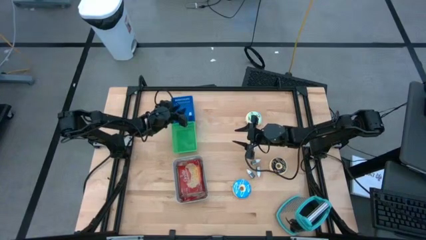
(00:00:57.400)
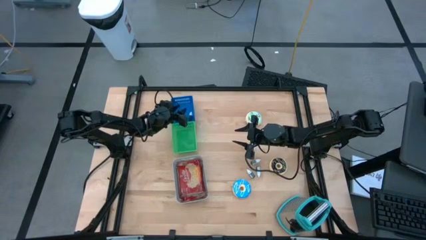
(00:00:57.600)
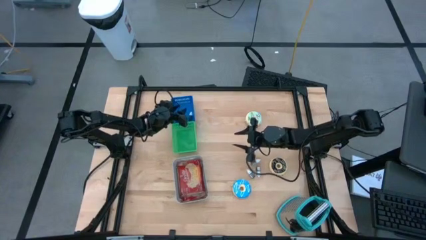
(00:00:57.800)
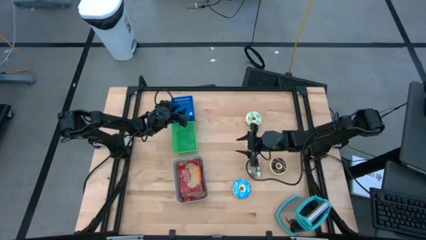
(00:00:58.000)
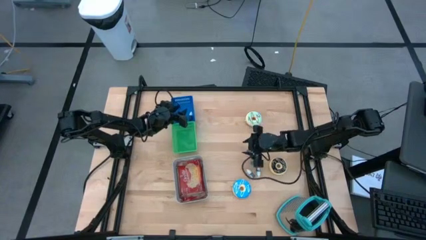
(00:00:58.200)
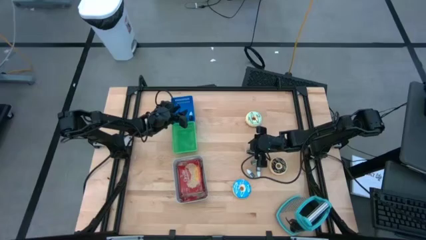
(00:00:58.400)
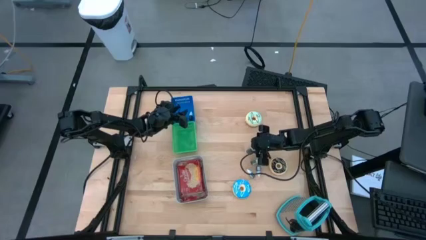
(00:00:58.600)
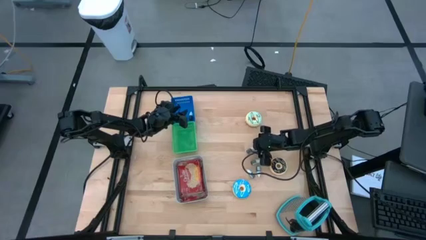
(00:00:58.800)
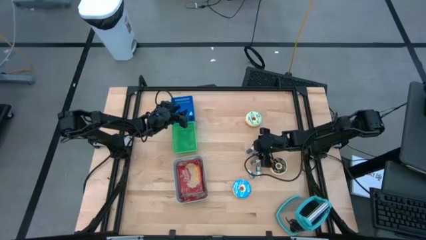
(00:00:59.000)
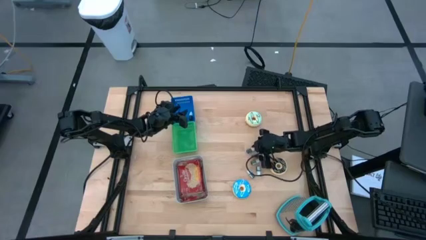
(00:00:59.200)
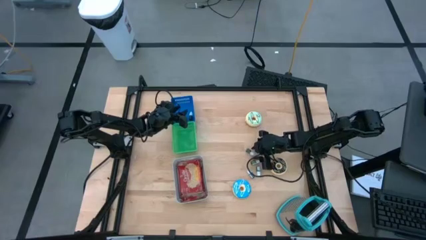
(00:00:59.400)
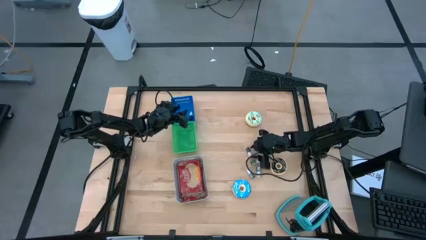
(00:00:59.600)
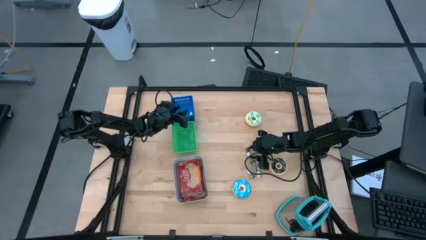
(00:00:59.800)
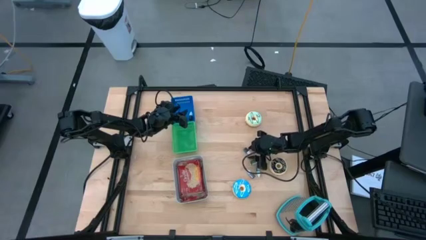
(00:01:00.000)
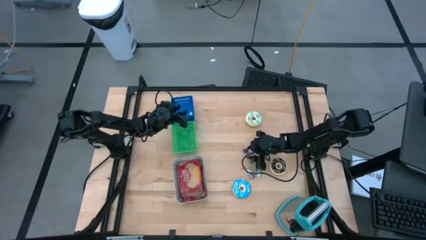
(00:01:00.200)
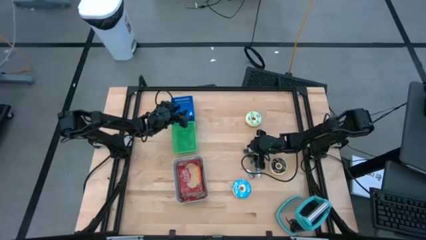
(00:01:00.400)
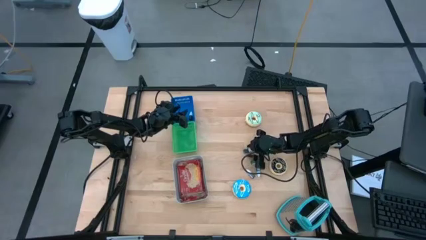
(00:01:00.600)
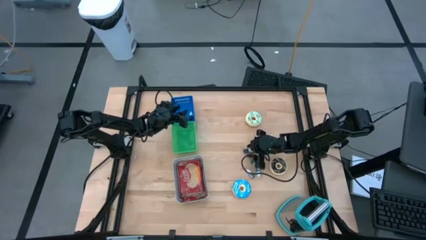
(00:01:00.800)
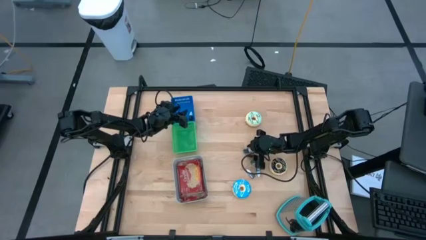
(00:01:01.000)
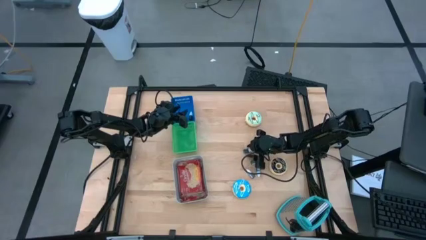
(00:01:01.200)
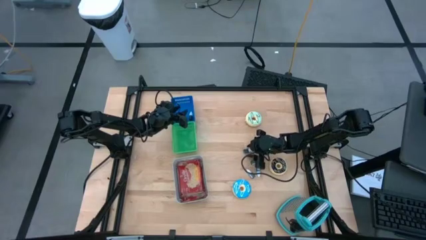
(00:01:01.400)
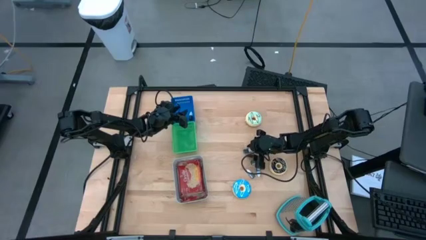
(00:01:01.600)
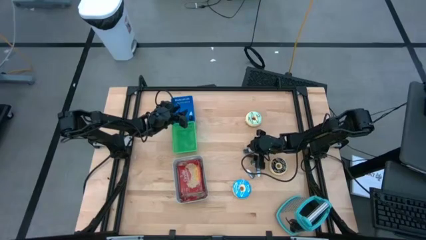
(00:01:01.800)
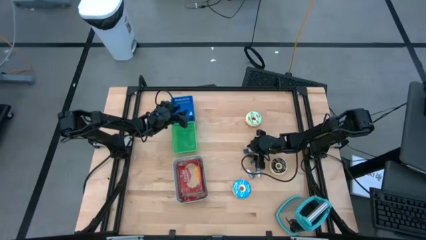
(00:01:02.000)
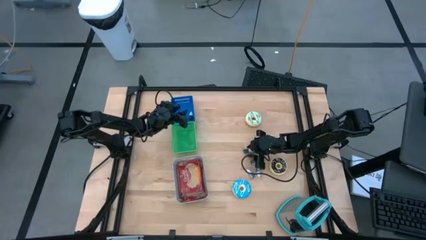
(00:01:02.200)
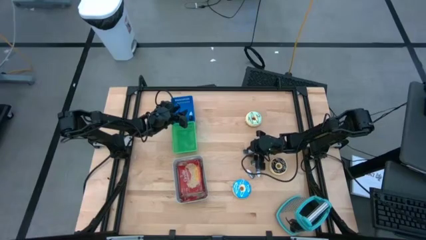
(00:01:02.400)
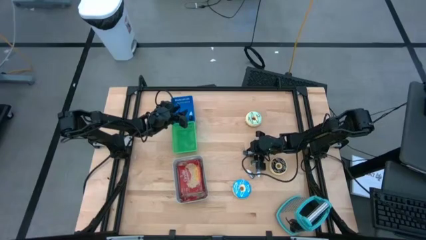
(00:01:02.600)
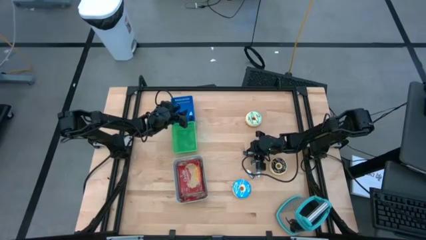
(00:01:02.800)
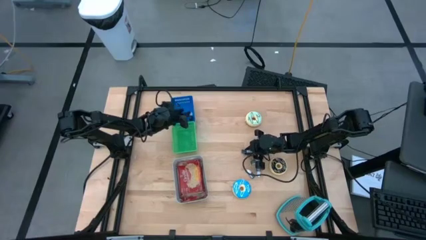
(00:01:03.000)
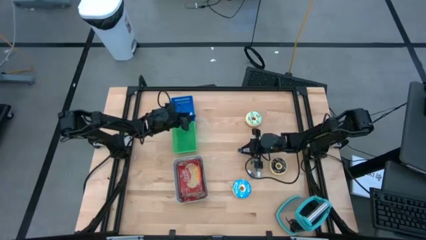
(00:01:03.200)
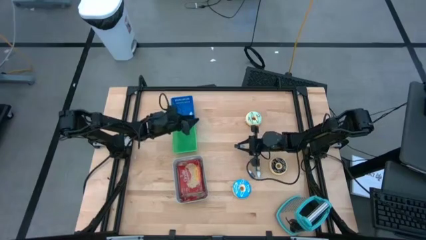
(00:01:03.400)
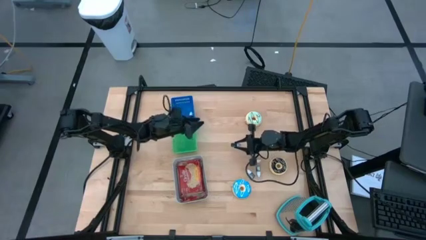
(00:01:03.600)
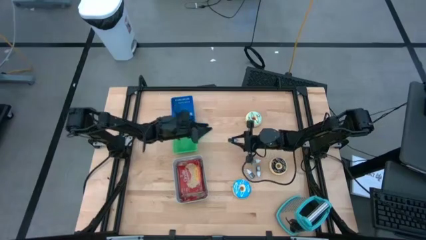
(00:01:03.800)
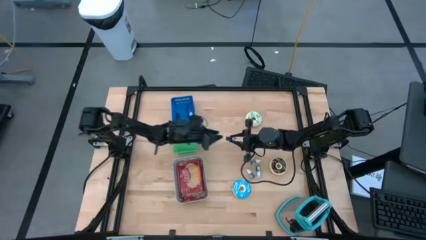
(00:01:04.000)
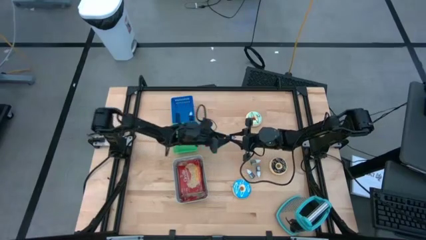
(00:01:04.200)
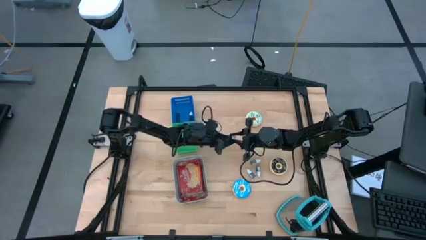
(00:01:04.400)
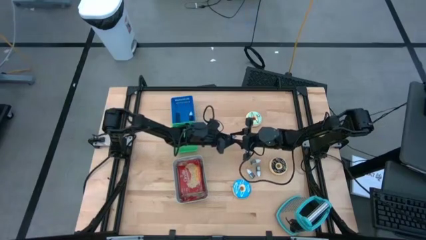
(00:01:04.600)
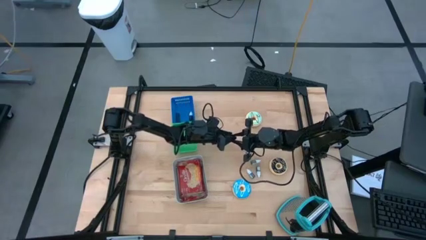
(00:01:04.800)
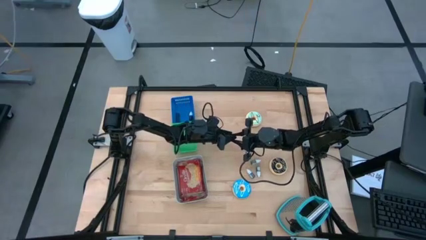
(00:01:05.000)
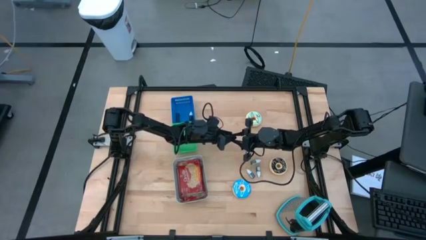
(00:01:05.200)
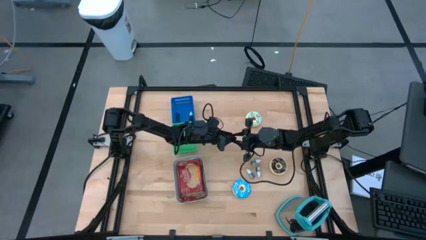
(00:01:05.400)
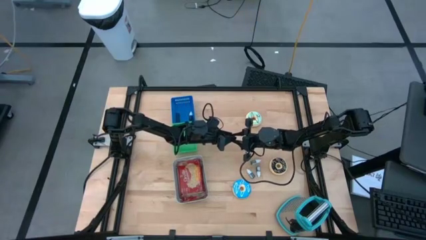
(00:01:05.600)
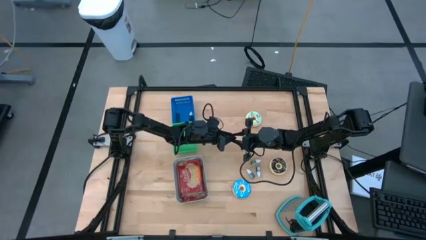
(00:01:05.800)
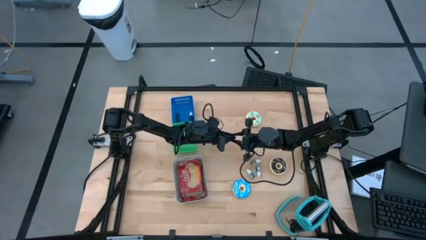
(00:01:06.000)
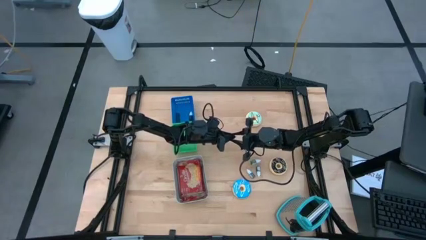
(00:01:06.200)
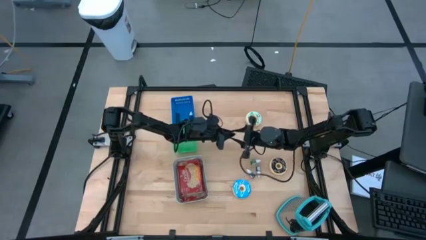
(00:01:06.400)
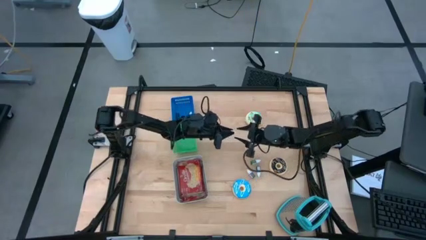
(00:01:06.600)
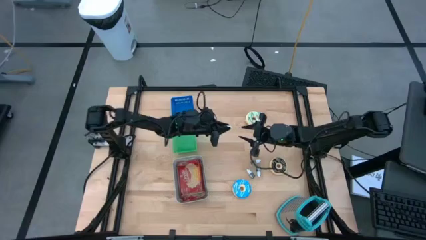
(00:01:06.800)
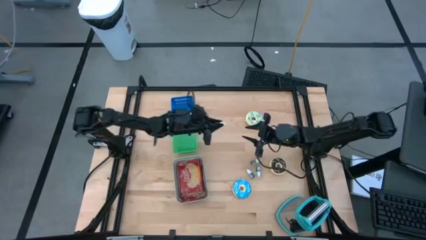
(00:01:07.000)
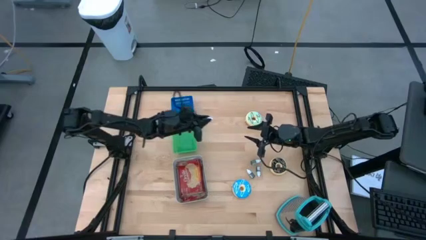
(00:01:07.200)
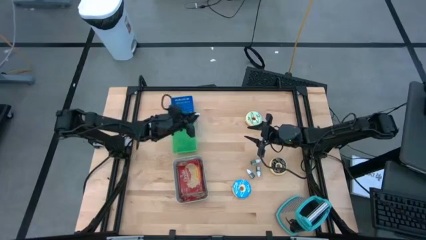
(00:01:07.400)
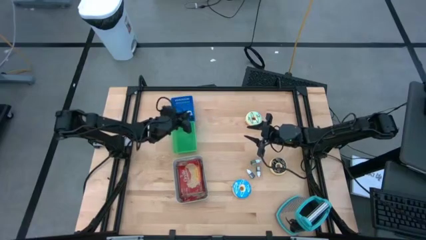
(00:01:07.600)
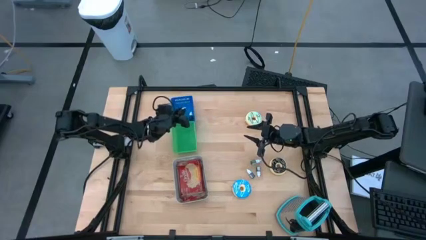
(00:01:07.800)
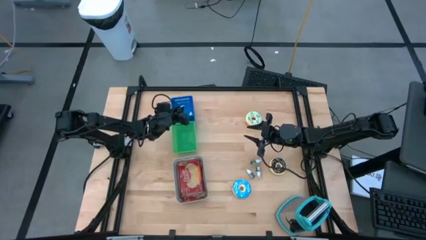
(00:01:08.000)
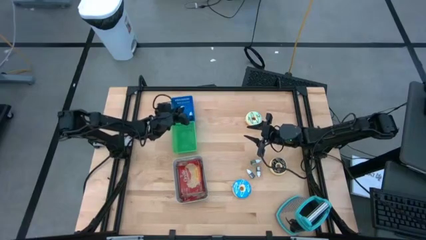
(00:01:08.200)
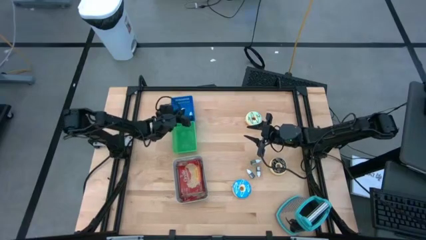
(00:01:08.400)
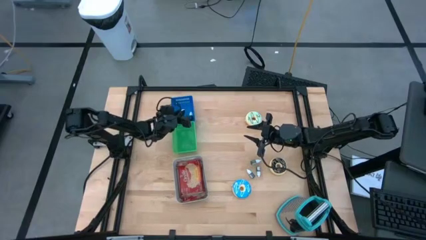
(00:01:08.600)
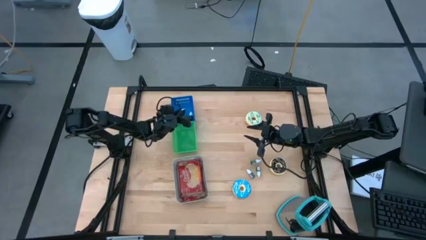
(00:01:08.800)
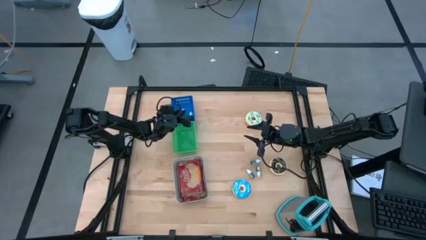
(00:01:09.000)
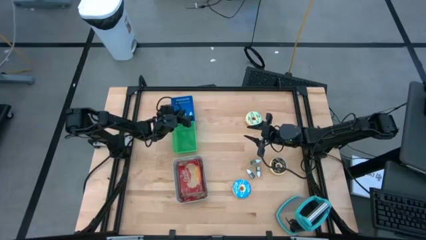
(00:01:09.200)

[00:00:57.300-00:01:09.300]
Task: Pick & Place Food Item
Put the violet food coloring bottle into the blue bin

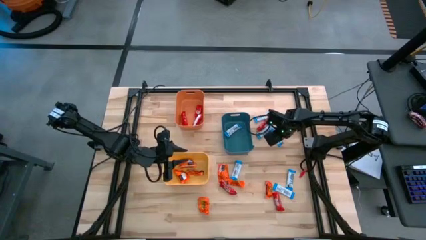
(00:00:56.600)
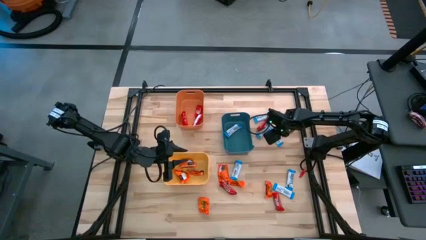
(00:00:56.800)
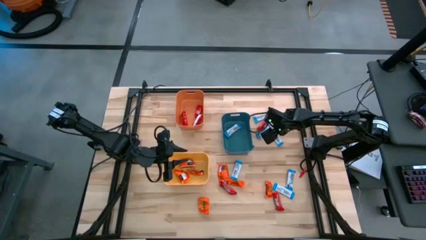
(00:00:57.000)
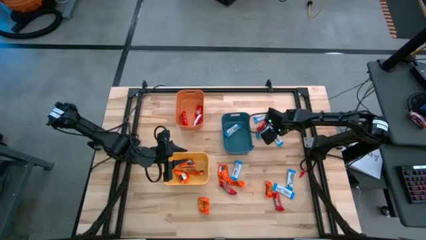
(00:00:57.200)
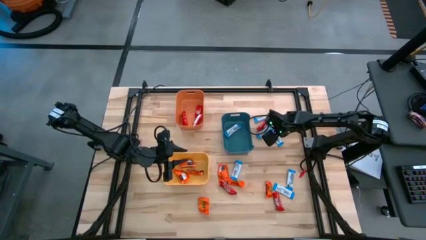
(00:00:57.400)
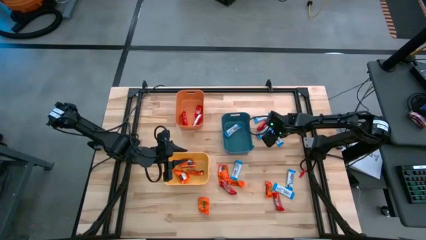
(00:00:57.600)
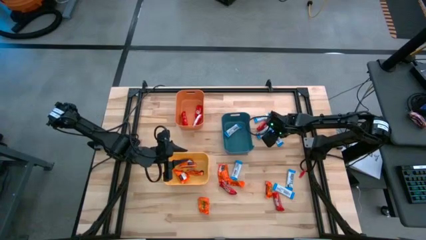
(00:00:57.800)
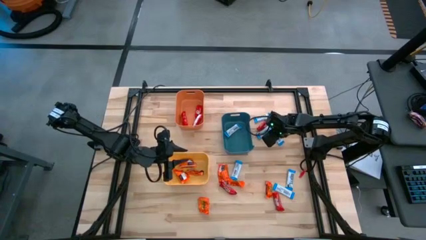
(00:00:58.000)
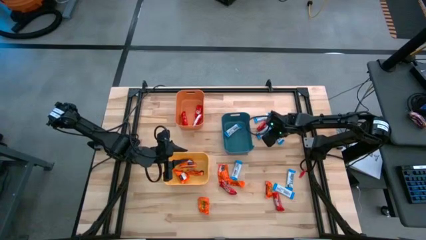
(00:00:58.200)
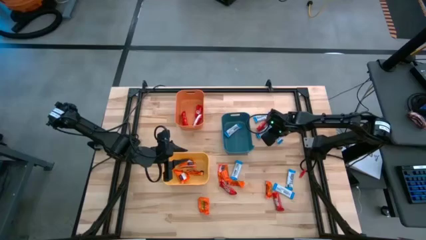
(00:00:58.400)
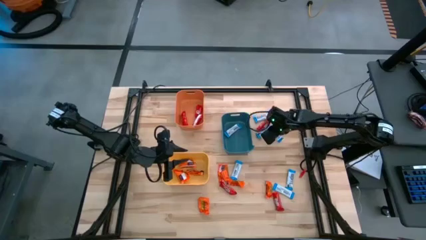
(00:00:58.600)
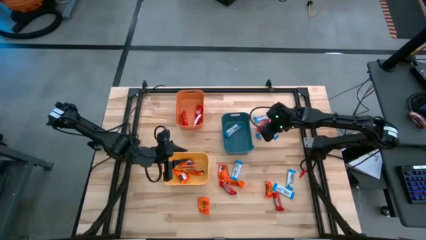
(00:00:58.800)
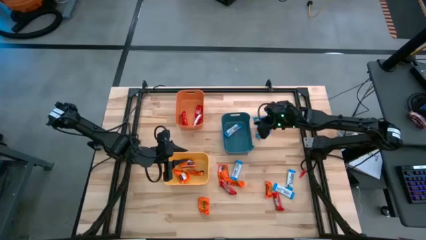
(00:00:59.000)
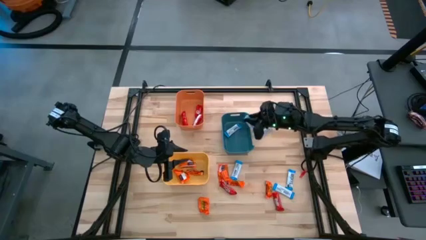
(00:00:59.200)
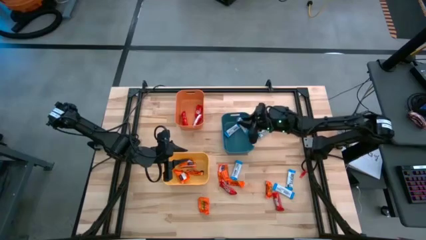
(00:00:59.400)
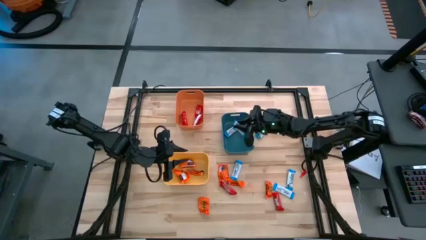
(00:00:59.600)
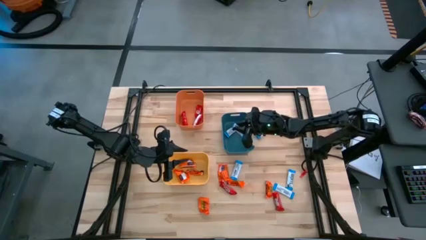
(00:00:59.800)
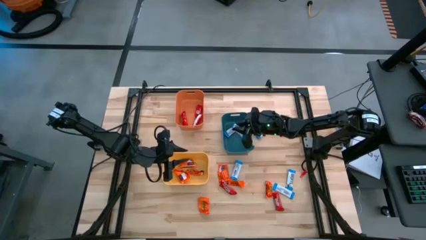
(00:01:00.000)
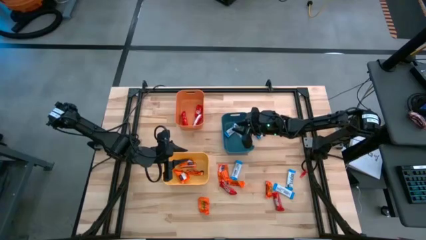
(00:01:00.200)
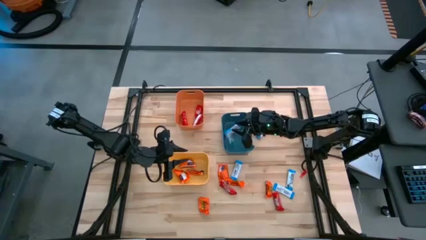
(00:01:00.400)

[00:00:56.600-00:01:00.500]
Task: Organize candy in baskets
Put the white chocolate into the blue bin
